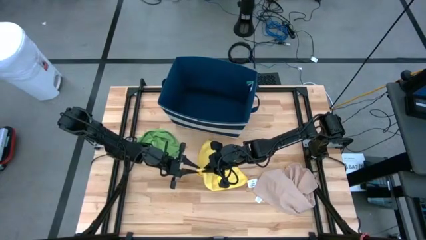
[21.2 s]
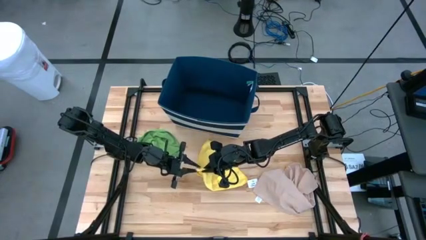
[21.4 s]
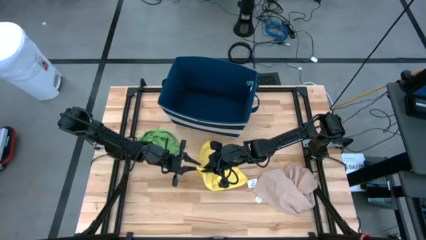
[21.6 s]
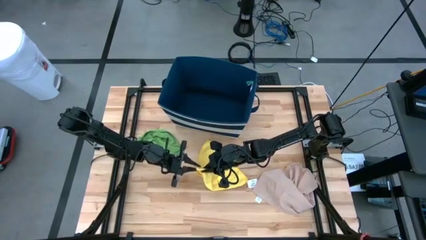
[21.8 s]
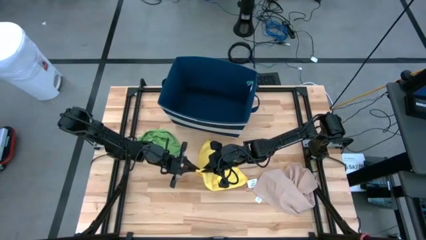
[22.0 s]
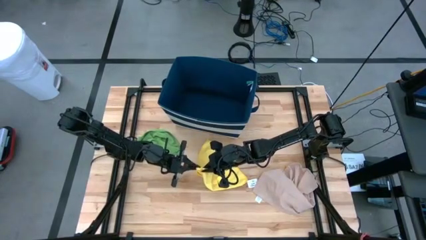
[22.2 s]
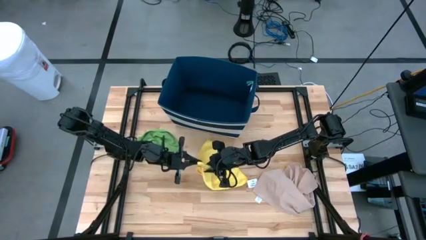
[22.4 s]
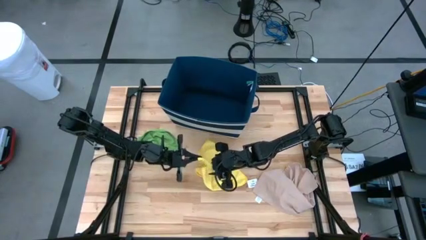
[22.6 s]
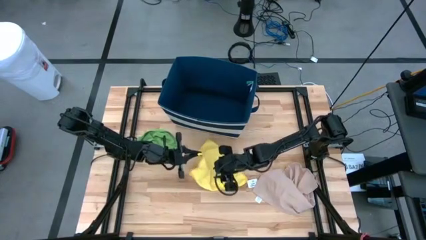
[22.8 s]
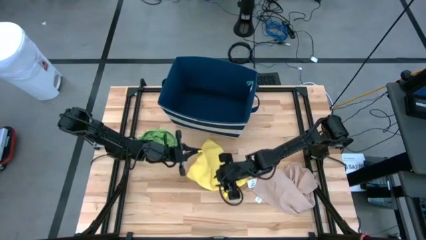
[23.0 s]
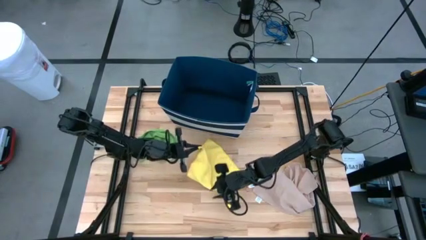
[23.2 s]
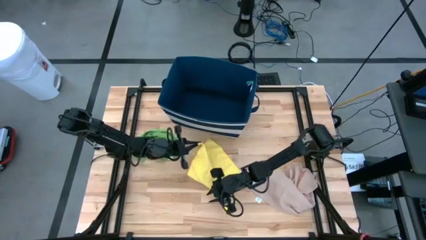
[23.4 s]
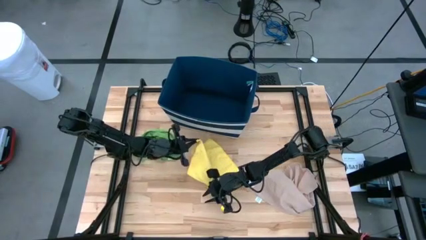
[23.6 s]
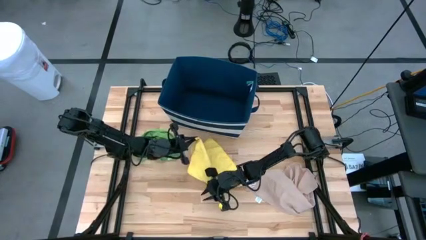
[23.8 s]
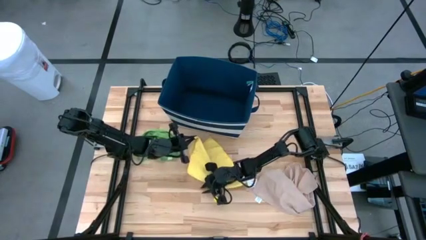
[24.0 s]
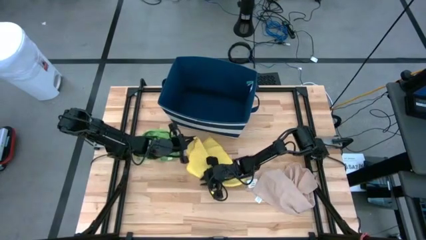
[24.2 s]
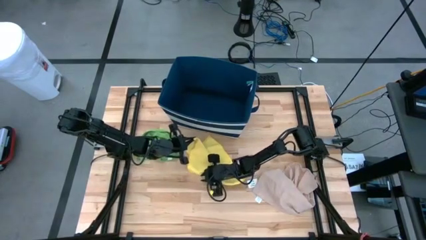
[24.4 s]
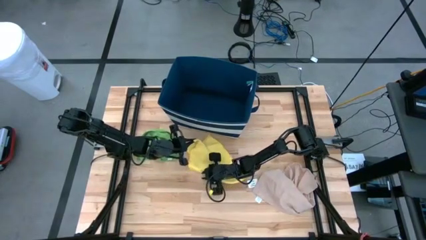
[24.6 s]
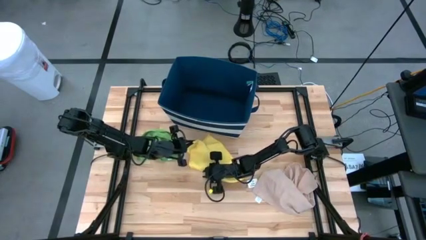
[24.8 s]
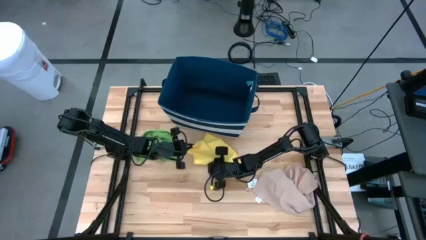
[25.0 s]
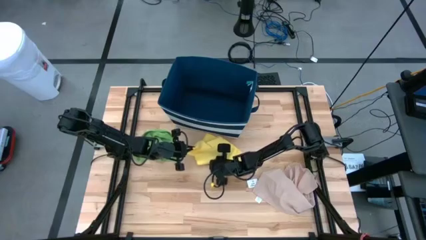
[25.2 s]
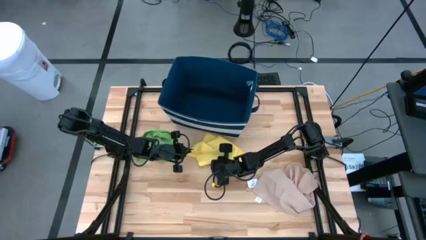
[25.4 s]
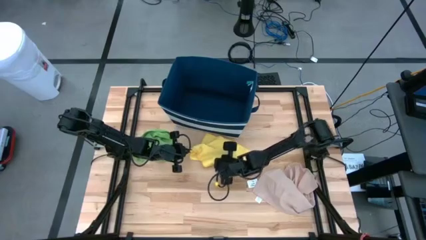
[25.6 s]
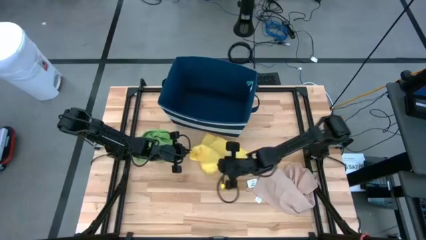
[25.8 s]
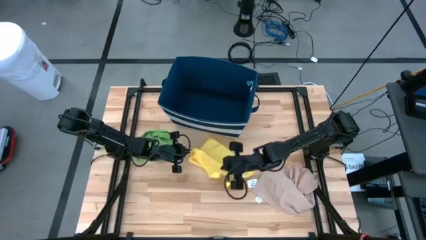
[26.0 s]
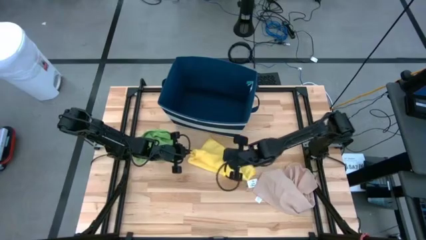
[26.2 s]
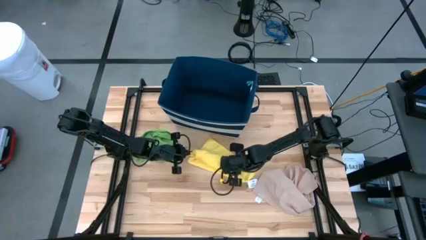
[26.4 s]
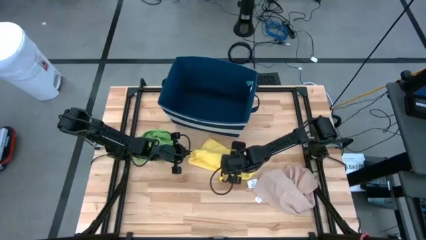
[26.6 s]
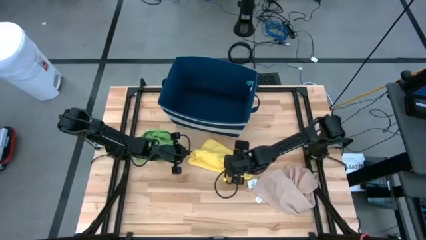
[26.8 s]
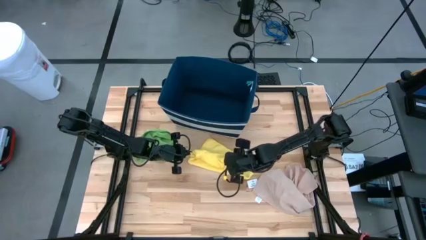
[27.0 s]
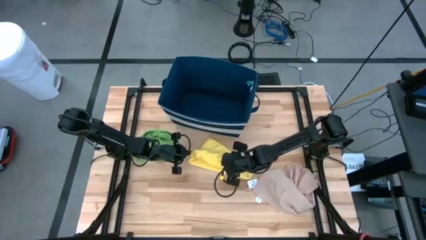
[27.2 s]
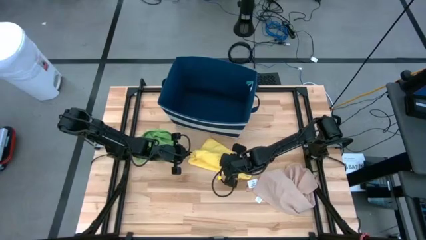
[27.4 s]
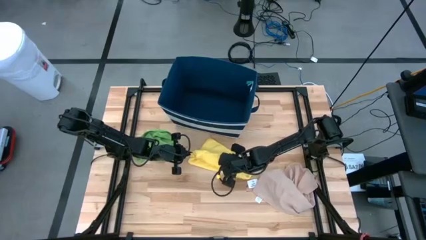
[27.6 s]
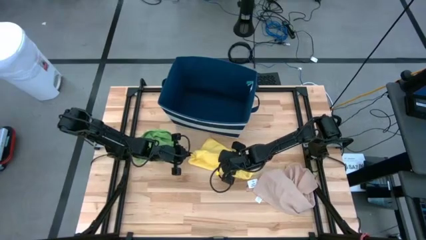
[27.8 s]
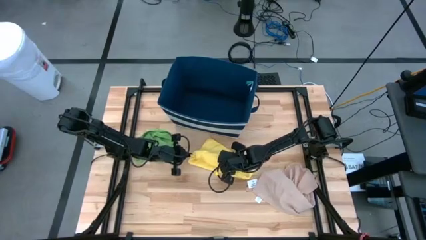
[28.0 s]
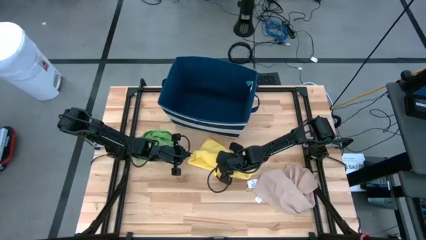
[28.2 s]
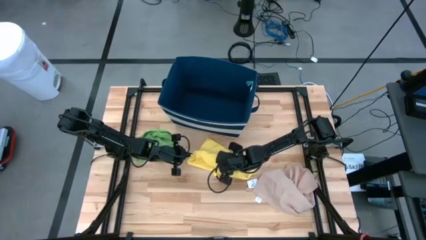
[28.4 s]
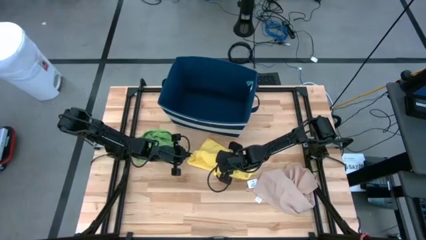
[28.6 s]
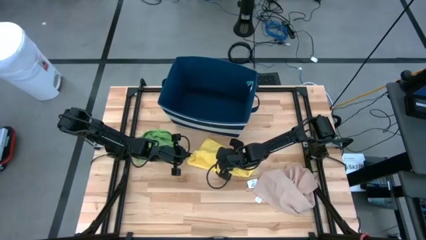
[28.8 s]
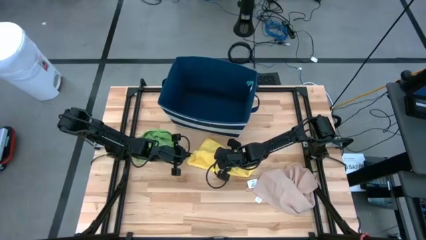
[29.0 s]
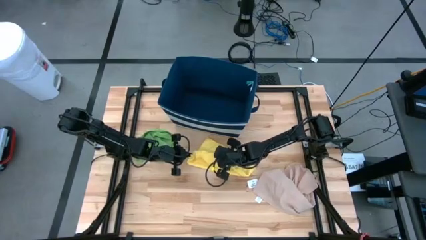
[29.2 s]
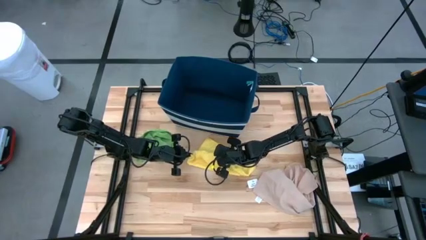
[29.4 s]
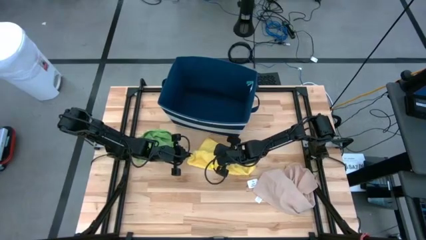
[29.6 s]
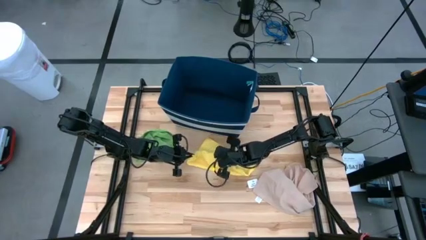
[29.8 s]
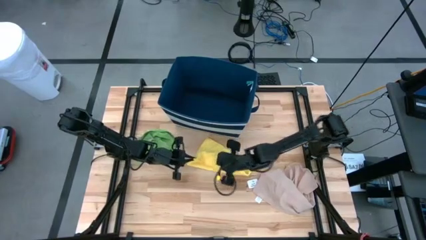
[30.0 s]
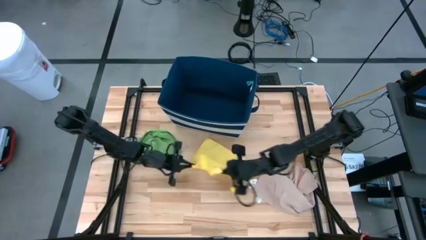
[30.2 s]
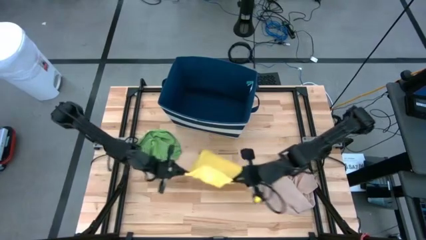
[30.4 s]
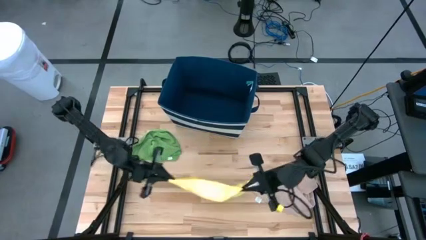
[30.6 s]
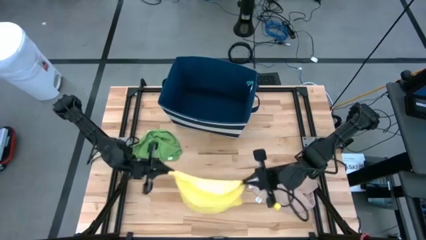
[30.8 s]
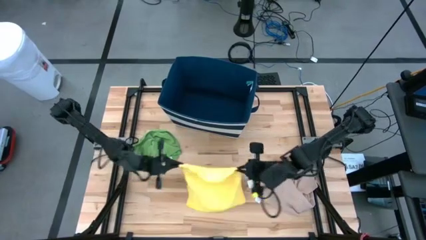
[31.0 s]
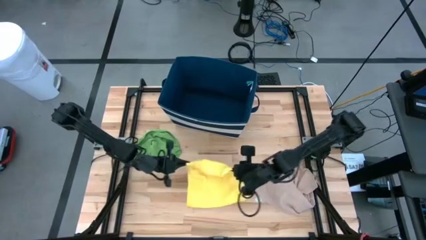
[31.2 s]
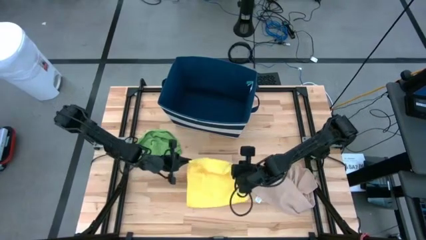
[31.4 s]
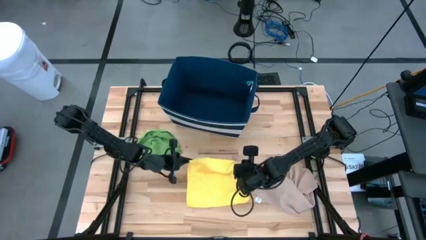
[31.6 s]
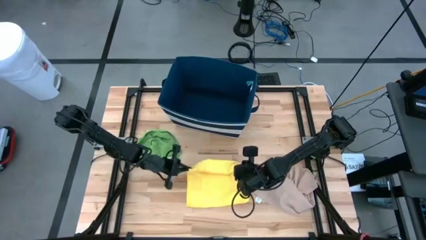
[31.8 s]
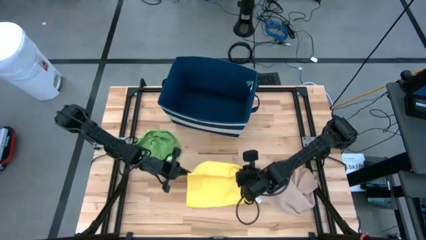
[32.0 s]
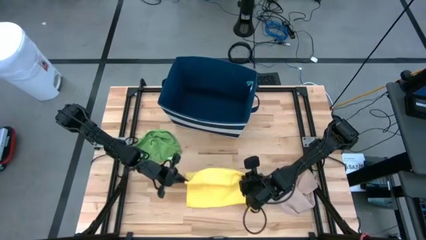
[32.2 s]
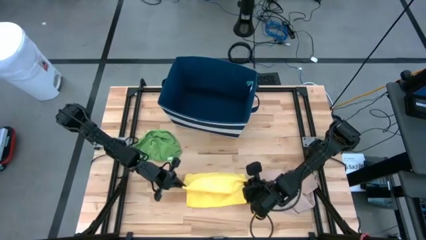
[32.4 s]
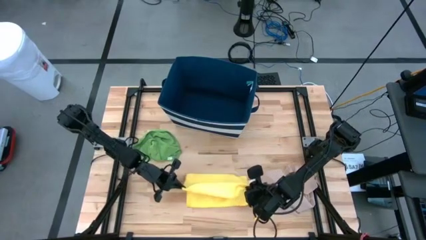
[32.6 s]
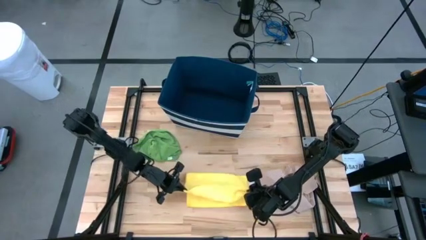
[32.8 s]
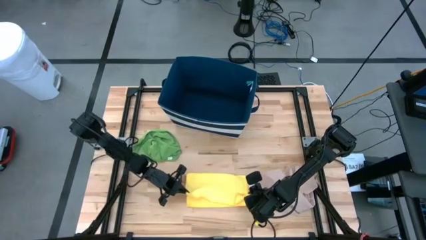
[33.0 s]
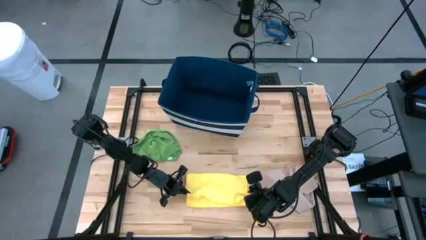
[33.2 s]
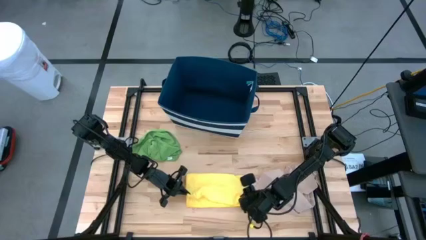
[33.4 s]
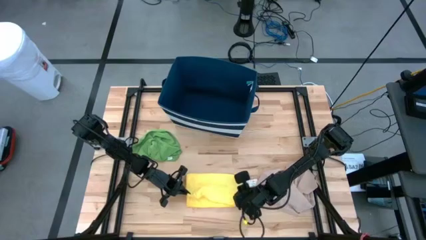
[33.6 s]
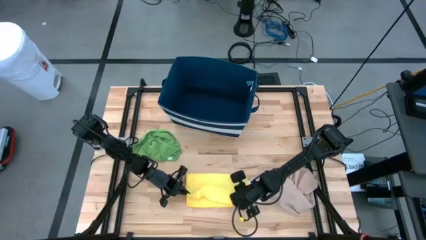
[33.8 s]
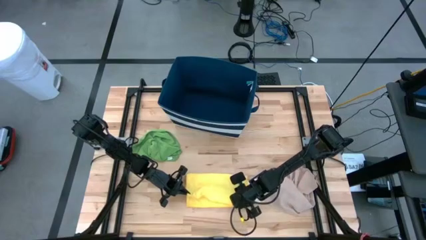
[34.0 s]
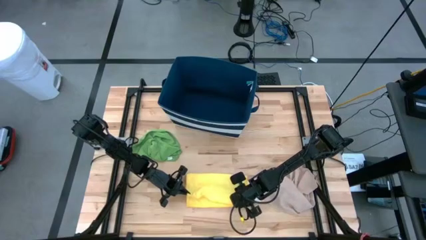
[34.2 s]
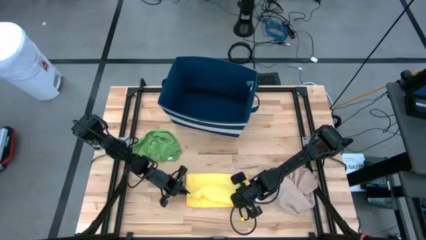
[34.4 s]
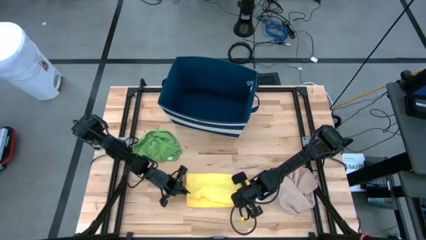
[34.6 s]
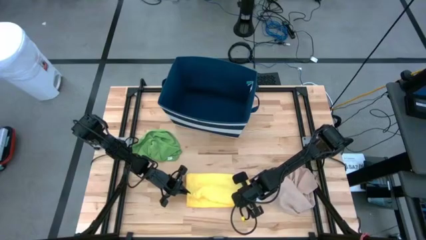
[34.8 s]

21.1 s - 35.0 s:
Task: Fold towel
Fold the yellow towel
